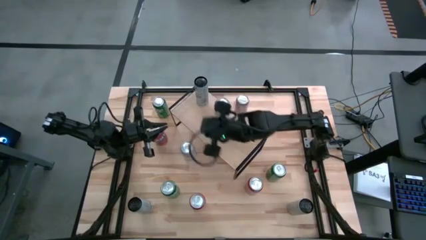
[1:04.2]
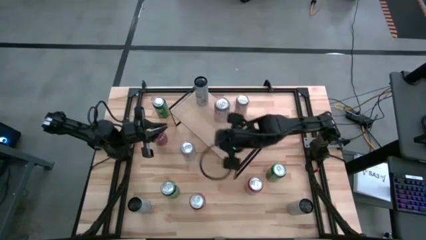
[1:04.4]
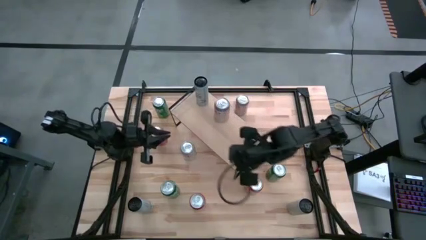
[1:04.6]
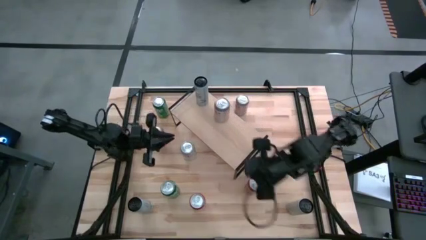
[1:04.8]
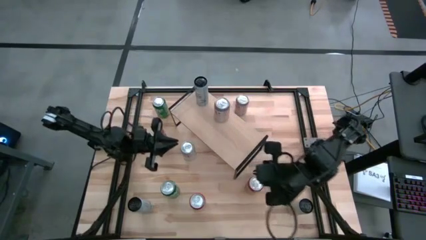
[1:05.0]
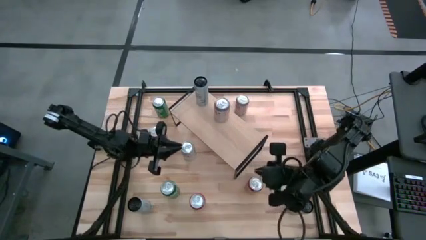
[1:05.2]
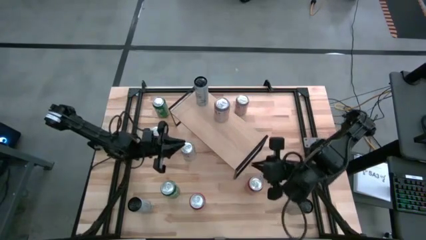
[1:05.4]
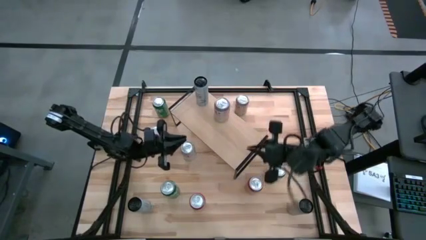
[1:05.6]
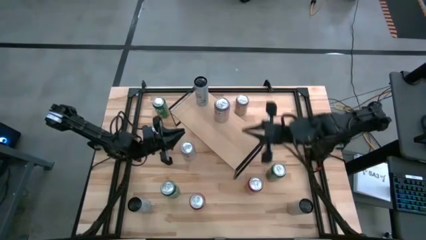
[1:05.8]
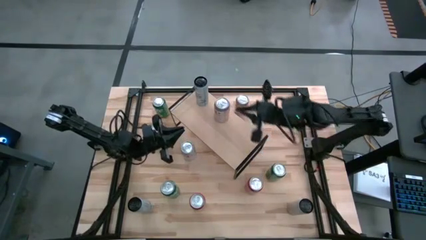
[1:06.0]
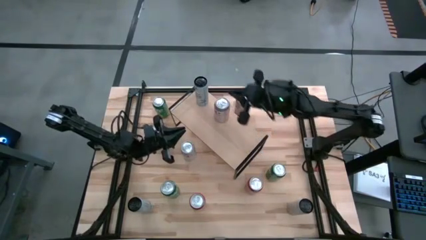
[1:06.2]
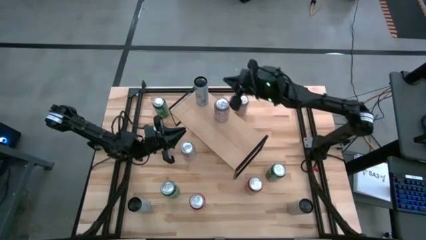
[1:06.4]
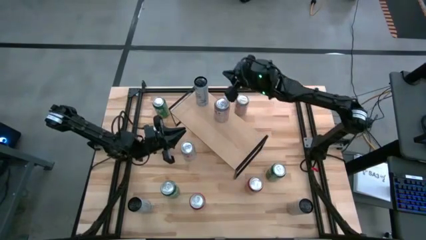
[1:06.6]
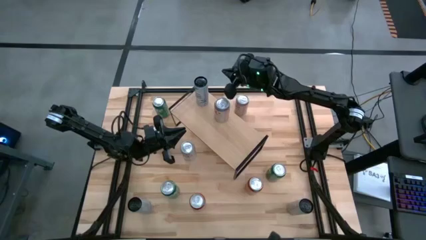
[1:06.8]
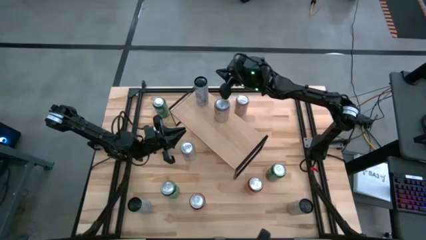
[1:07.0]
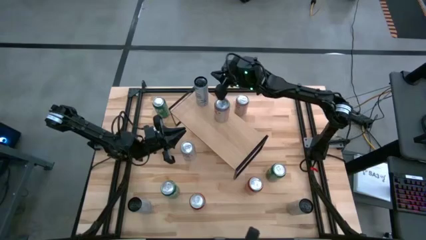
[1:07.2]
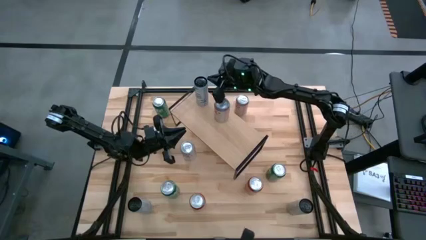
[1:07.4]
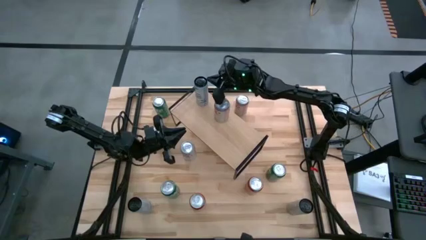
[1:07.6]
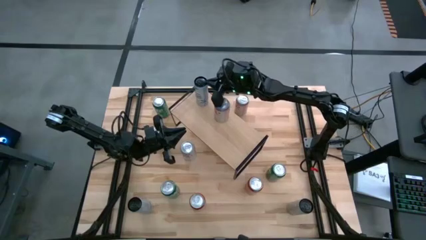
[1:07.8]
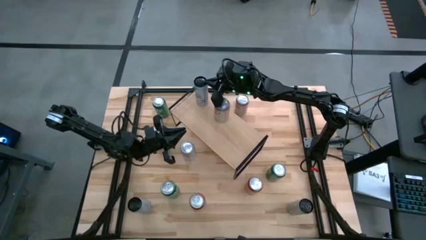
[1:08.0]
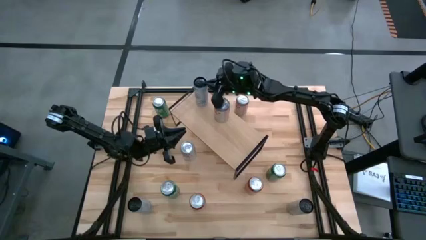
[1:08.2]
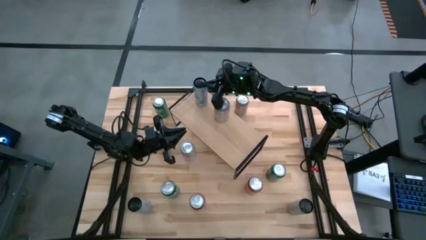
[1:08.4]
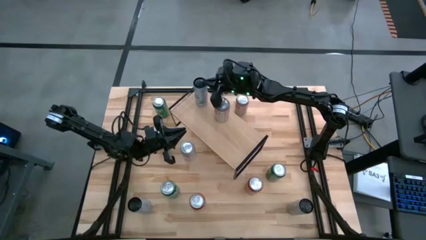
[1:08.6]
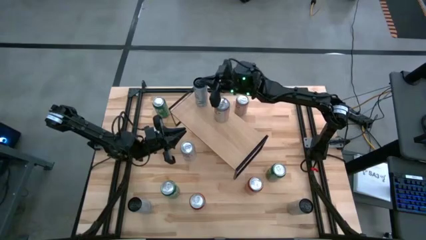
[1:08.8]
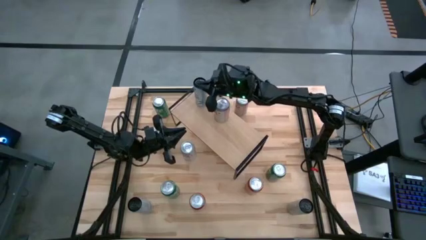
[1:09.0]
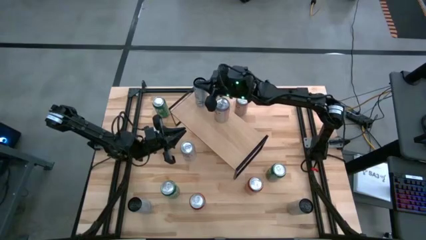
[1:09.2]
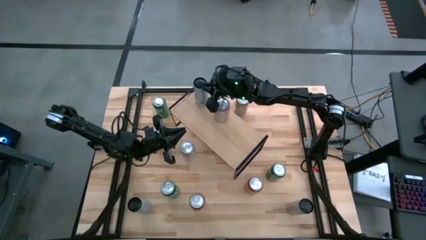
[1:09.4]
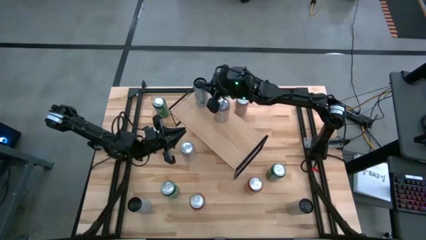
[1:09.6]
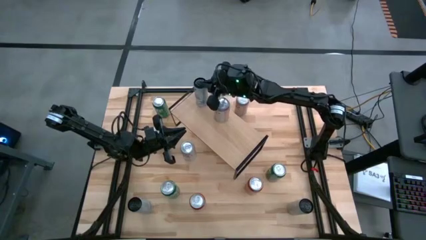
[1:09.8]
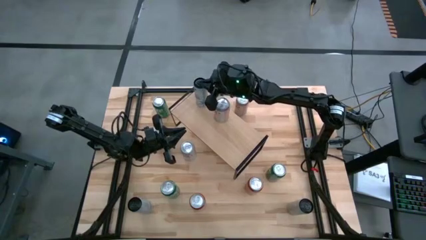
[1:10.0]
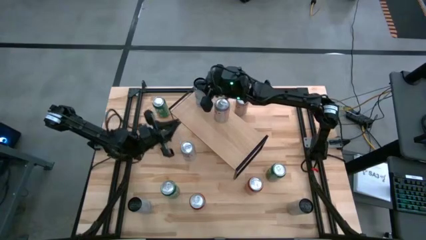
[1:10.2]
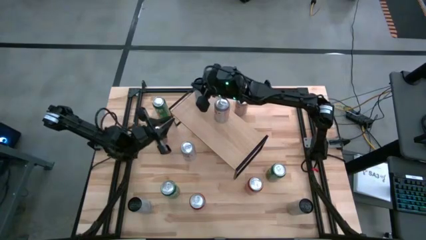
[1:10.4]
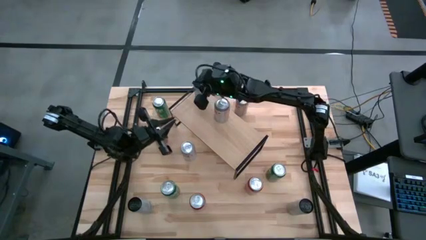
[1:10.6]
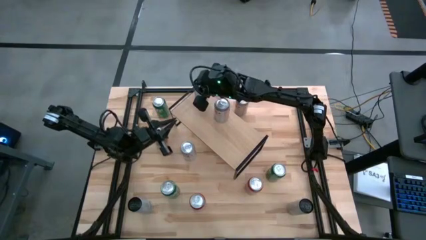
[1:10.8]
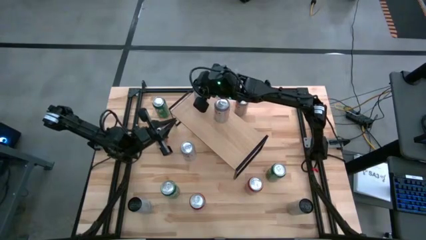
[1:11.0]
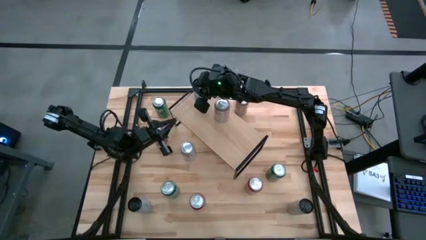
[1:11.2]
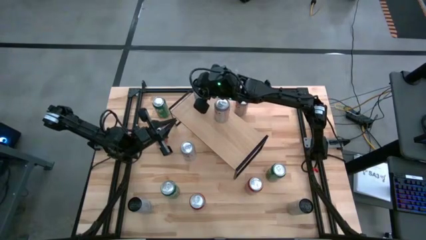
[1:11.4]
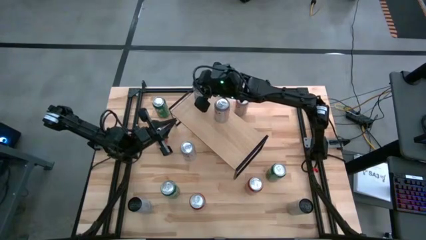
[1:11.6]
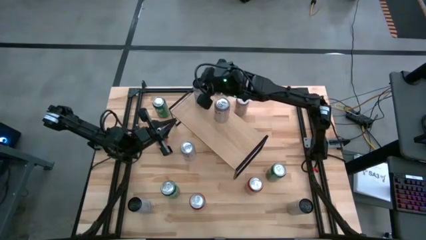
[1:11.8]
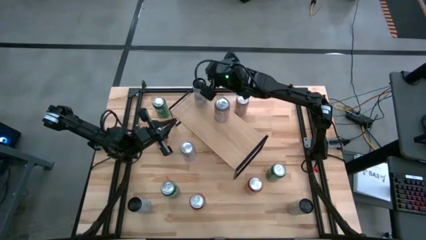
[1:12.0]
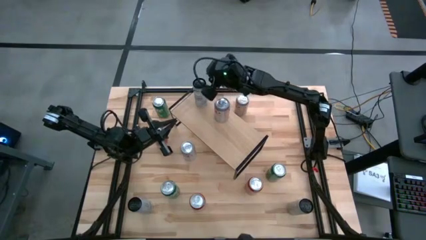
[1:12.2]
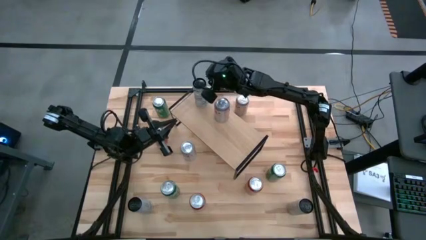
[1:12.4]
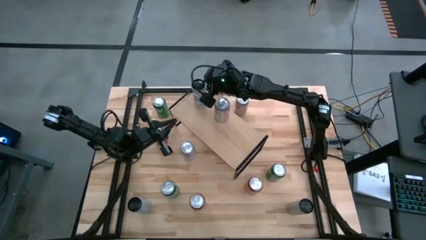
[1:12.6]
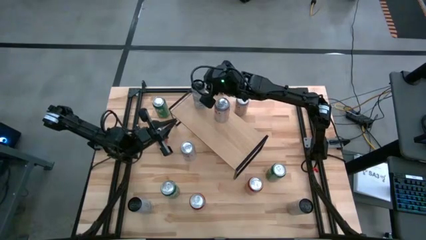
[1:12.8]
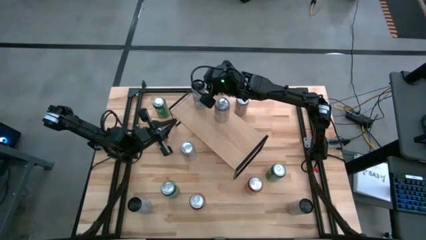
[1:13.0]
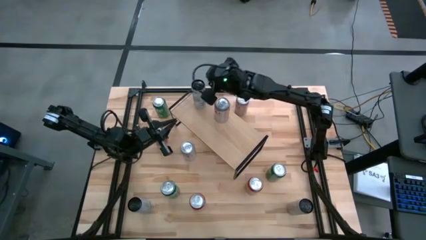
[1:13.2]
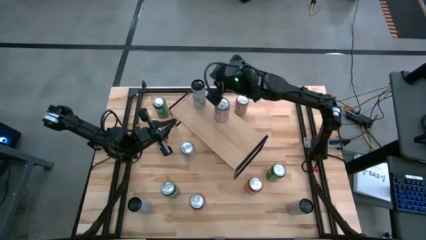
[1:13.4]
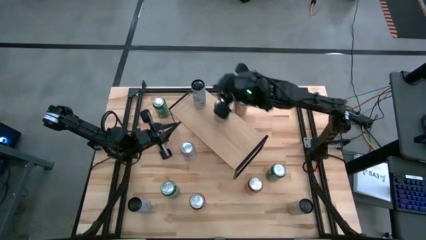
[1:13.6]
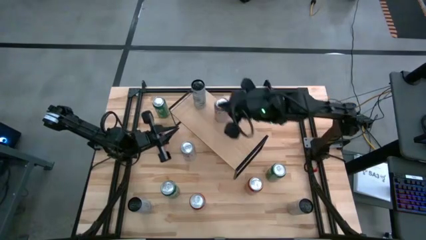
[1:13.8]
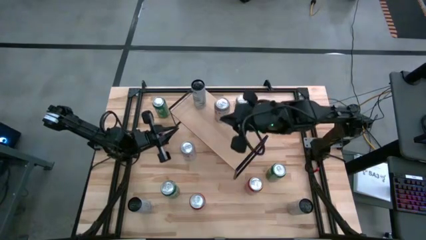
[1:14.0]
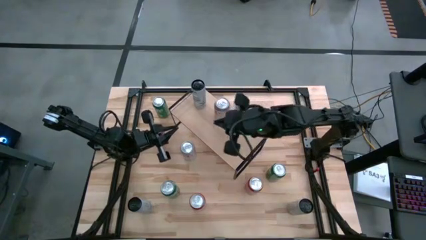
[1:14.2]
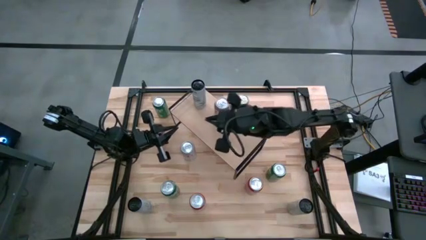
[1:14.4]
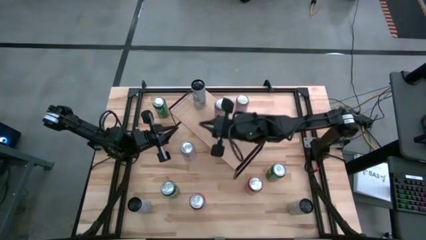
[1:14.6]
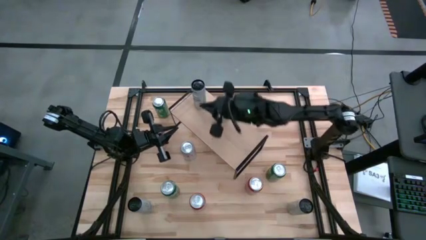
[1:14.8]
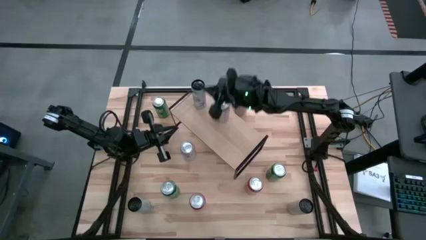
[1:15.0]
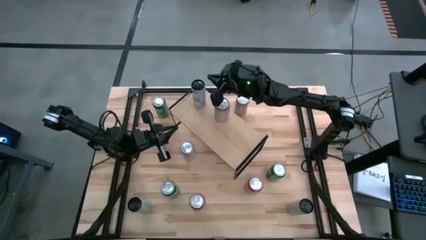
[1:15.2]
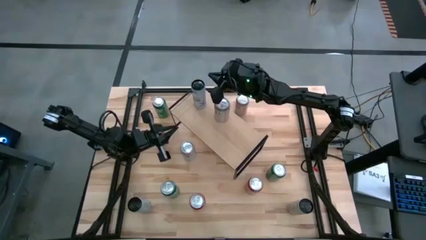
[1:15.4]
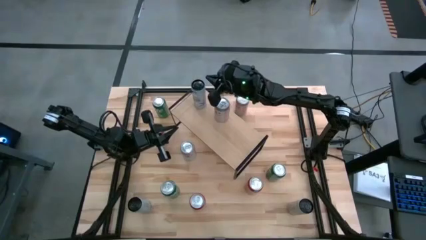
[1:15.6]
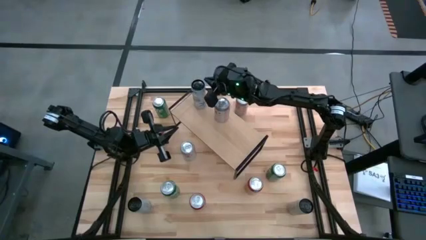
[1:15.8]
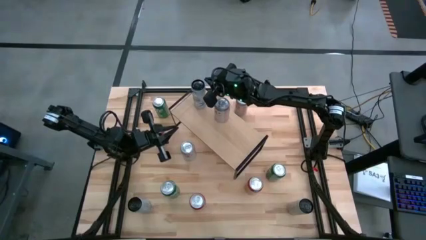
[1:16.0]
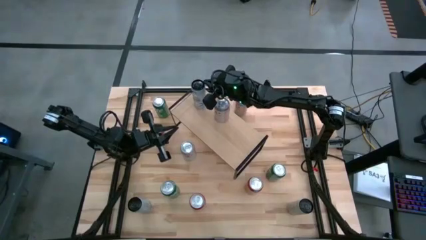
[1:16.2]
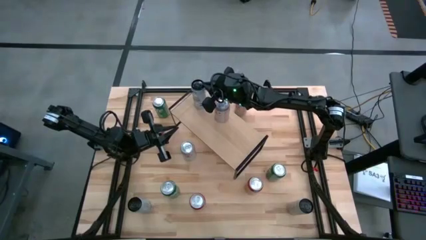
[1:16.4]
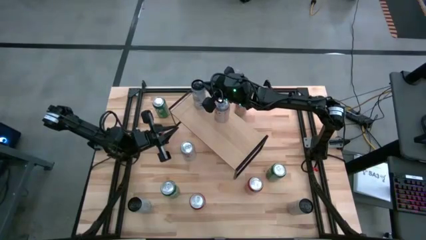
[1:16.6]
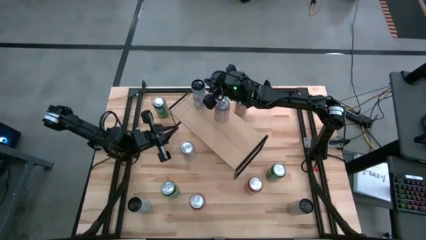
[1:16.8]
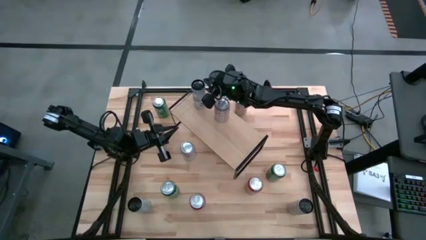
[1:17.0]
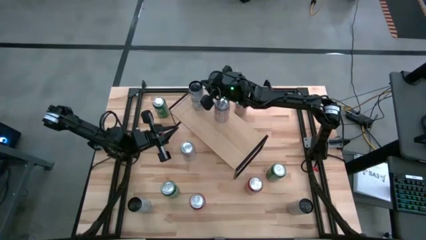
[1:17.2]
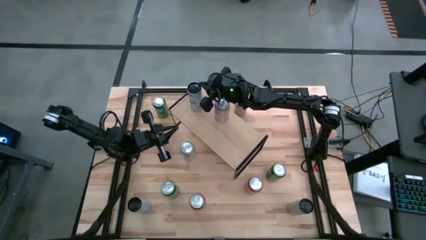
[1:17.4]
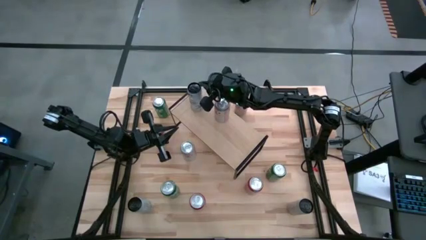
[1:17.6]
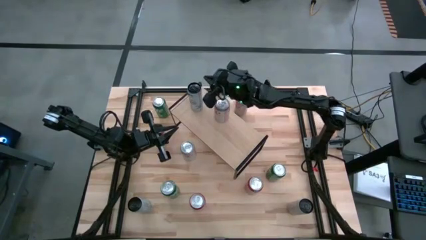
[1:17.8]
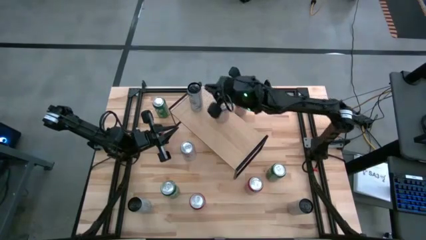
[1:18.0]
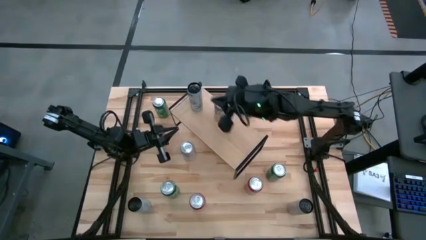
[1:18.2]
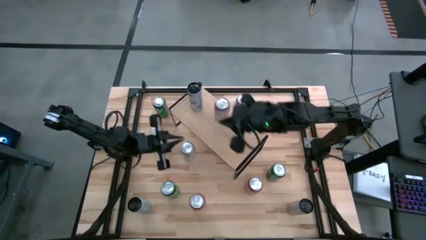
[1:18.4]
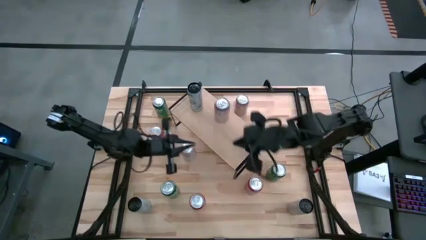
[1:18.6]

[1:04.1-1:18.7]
Task: Place canned beverage on shelf
Put the top blue soda can on the shelf

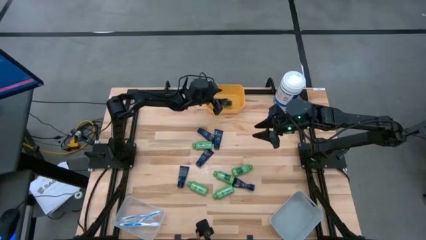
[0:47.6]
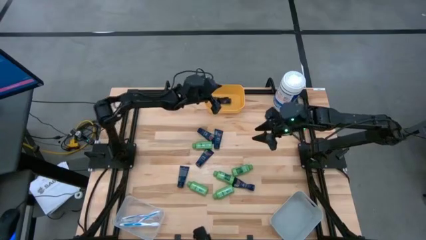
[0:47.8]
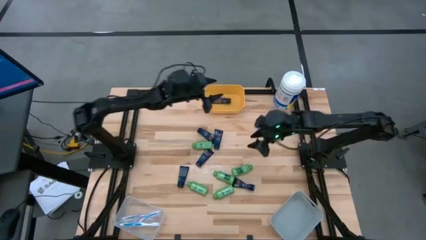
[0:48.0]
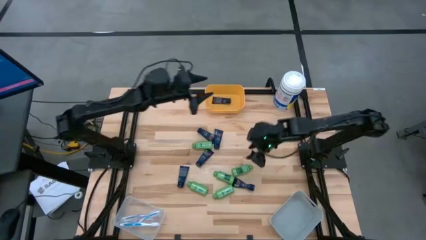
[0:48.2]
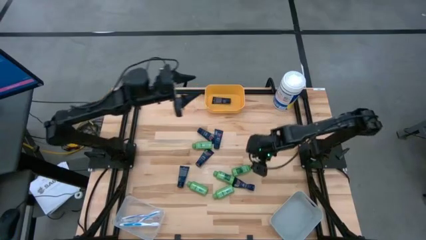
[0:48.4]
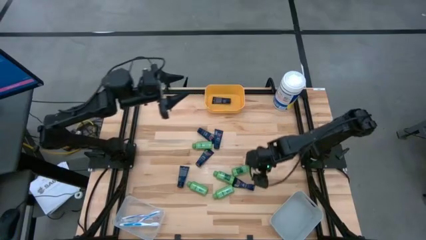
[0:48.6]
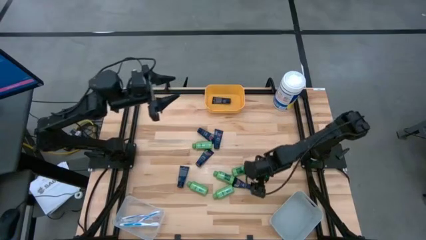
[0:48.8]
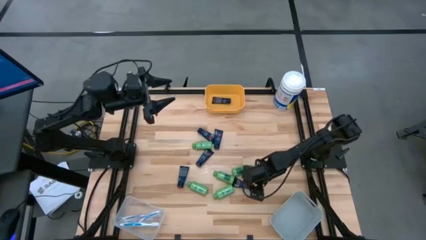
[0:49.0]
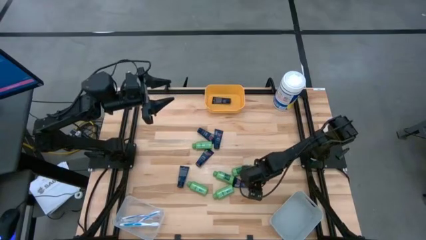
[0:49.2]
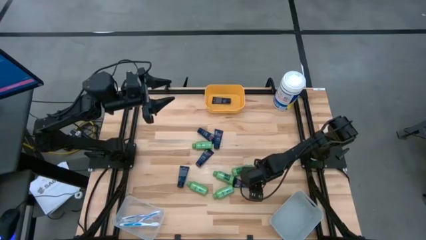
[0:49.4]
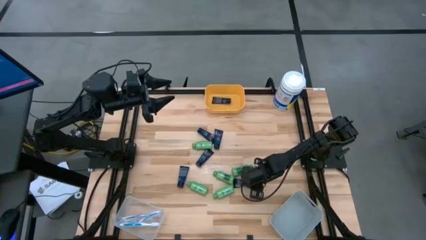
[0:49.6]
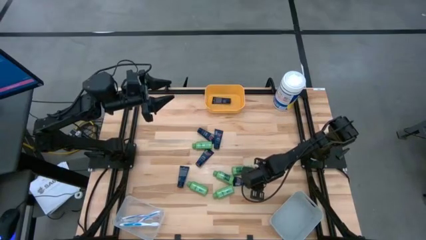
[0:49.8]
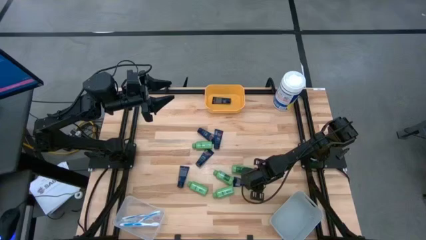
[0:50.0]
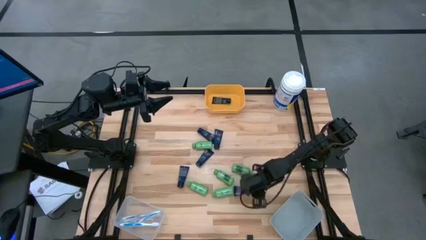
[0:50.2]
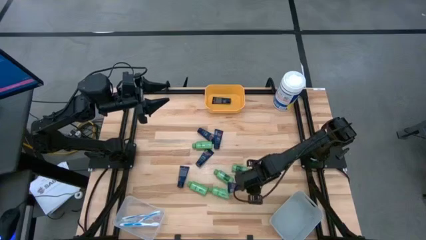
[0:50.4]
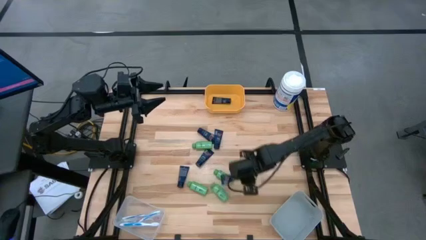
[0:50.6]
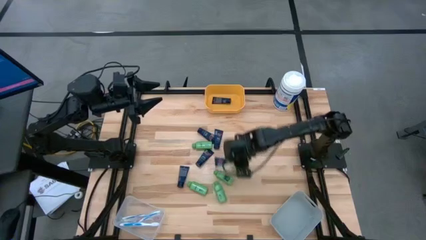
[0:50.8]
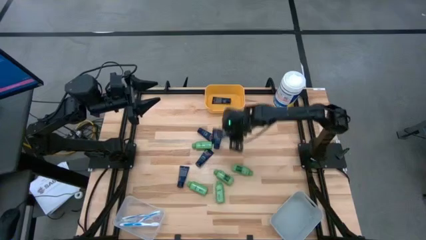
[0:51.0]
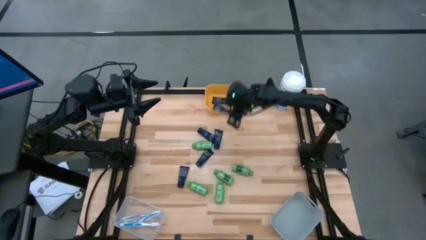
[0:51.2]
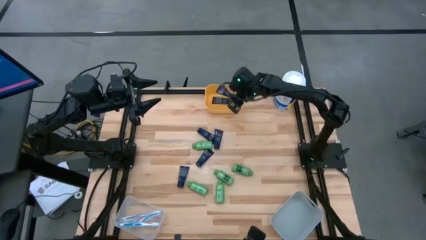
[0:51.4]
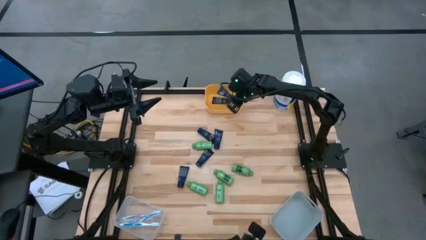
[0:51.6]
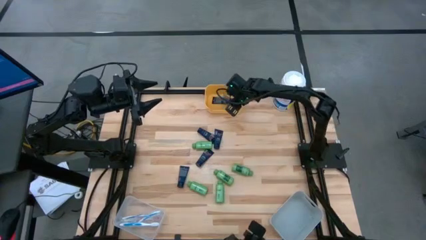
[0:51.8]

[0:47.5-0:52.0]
Task: Pick & Place Travel size toiletries
Put the shave cream into the yellow bin
